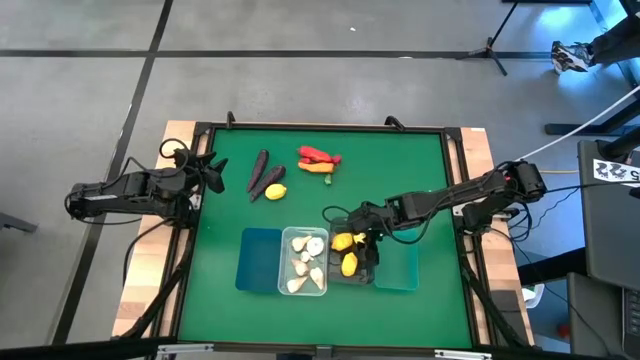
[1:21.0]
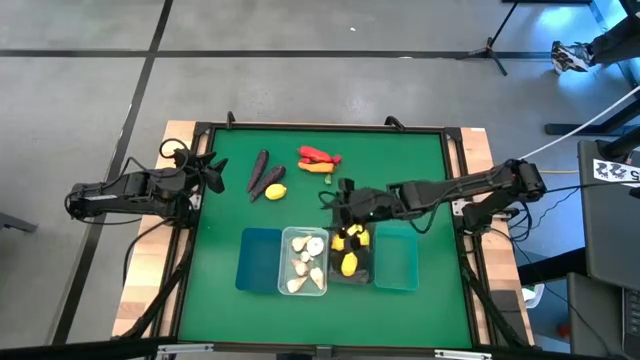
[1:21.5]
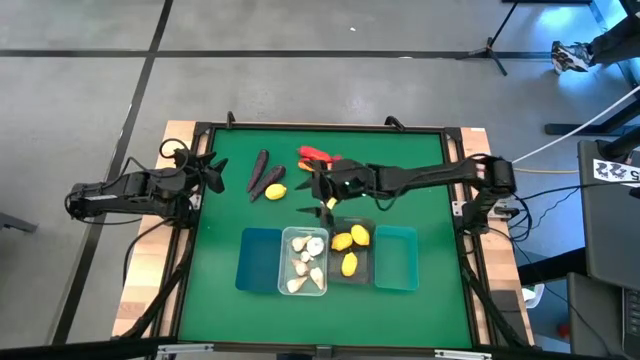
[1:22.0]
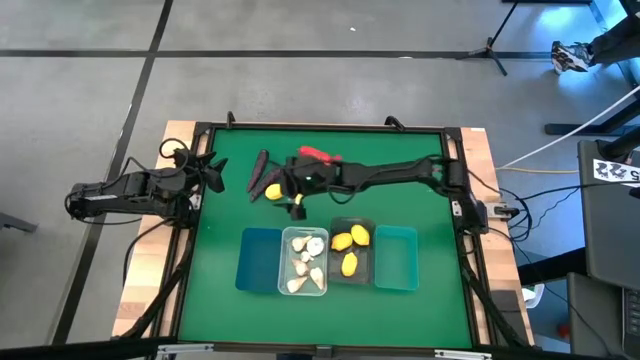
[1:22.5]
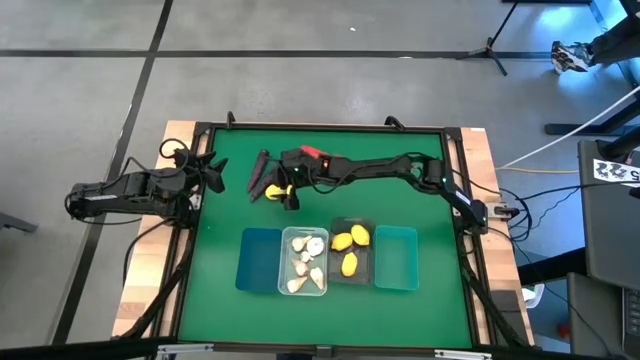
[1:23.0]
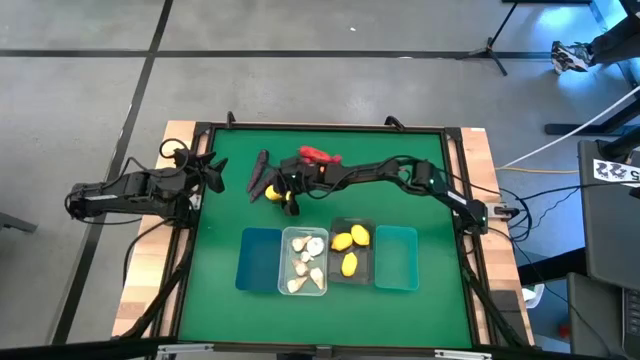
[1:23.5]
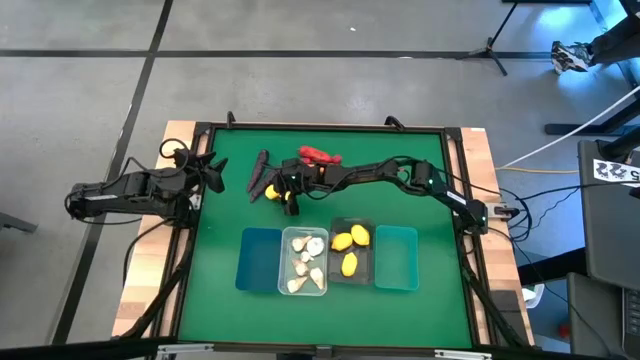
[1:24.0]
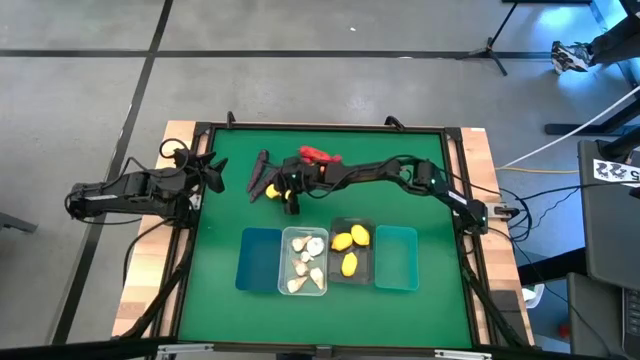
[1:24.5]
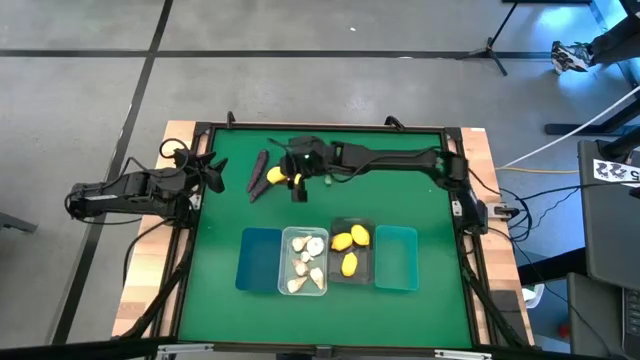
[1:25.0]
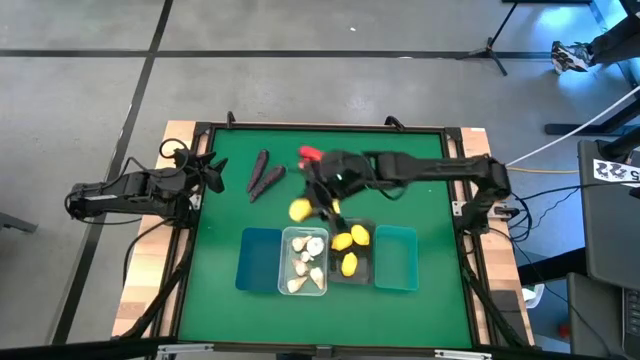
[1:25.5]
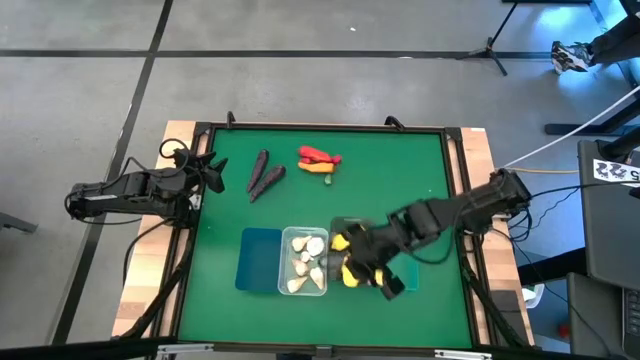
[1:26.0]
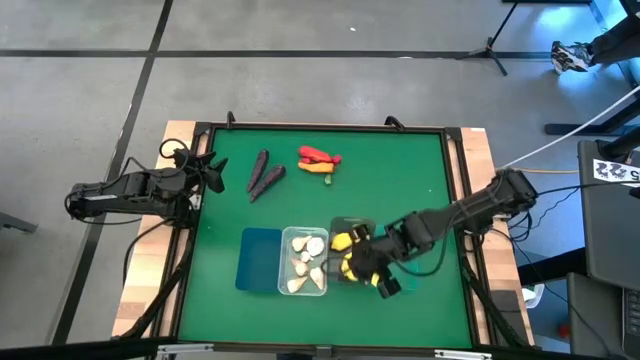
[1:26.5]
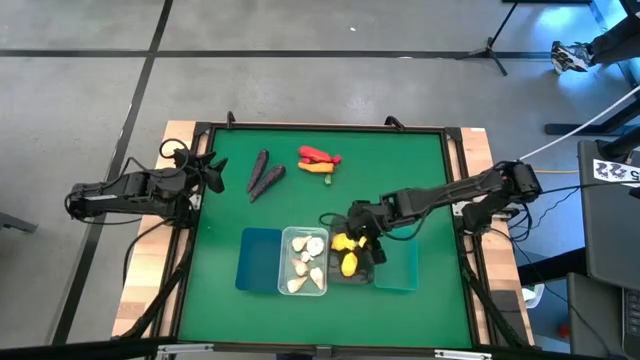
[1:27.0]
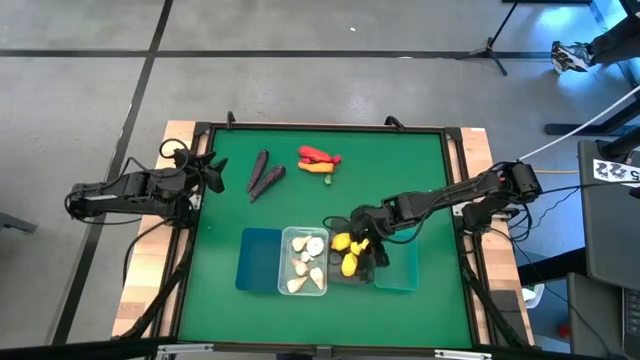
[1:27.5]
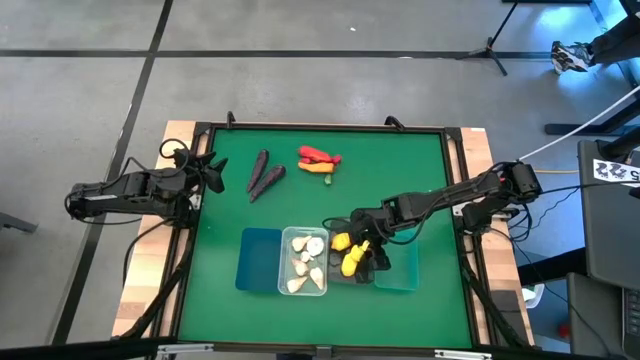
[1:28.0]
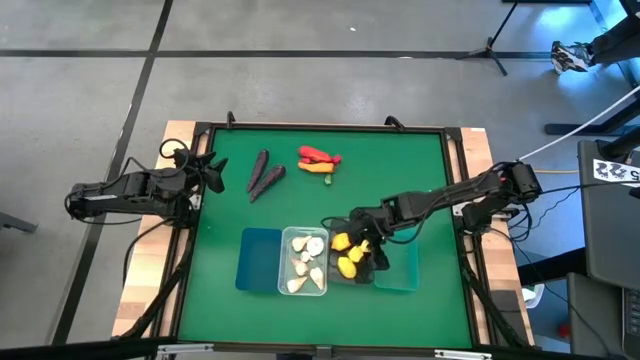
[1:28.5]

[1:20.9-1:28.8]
Task: Sort produce into baskets
Put the yellow lemon into the black bin

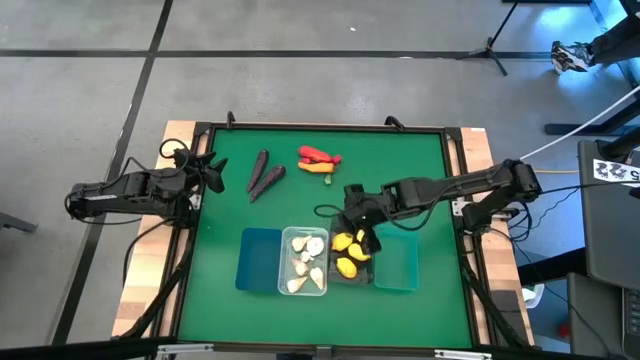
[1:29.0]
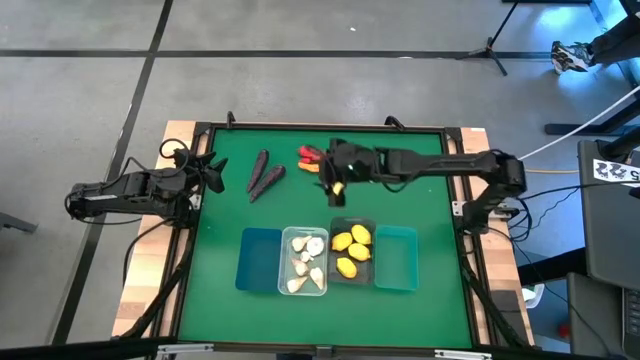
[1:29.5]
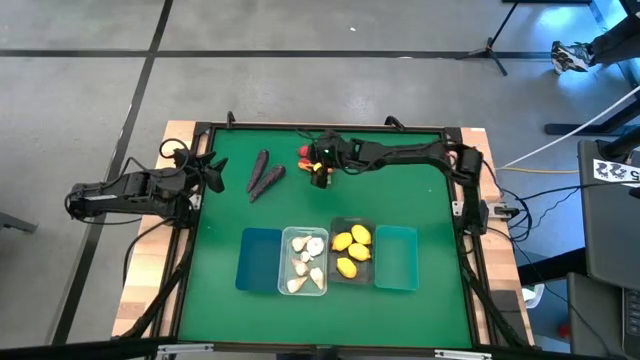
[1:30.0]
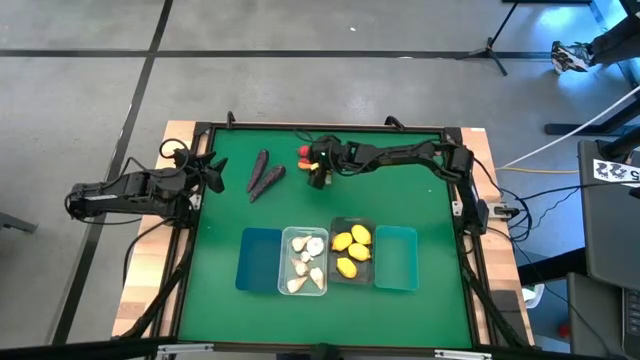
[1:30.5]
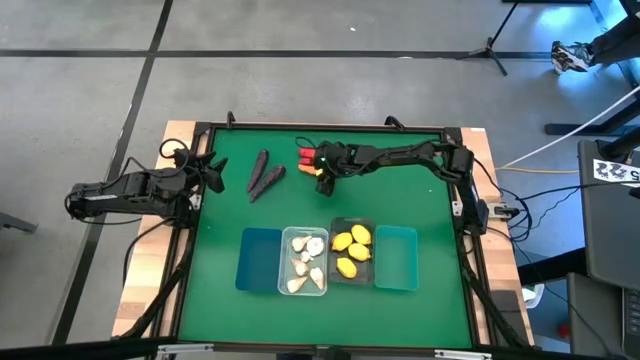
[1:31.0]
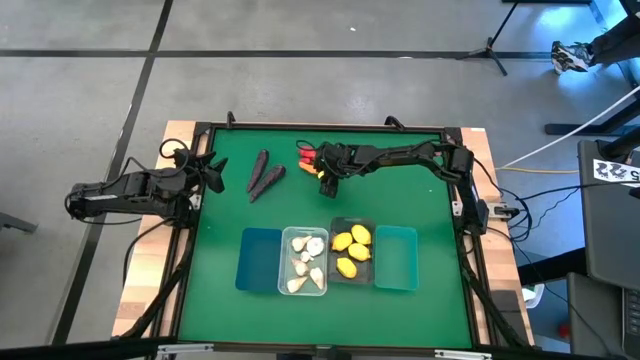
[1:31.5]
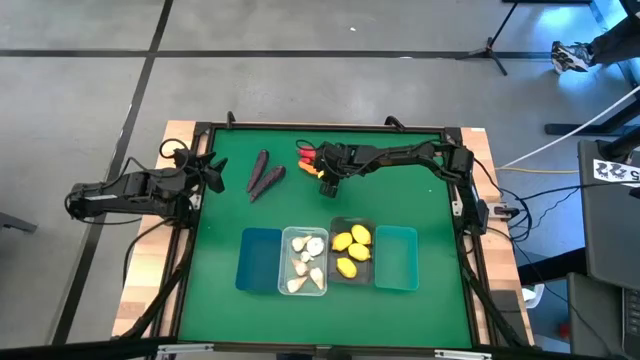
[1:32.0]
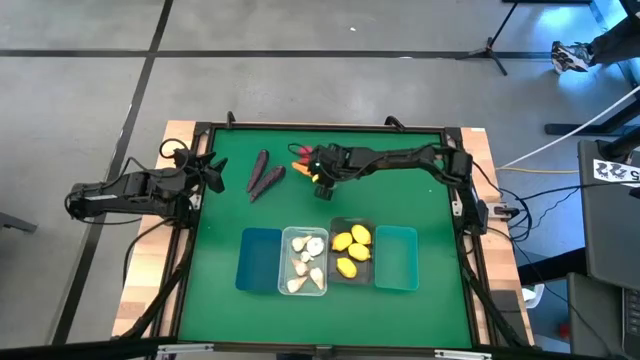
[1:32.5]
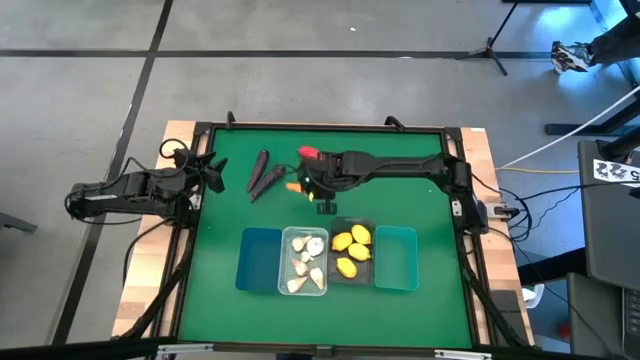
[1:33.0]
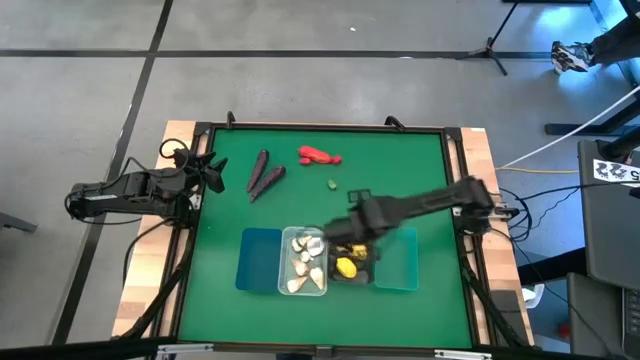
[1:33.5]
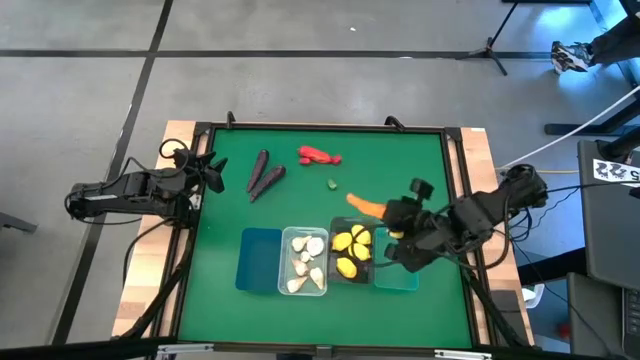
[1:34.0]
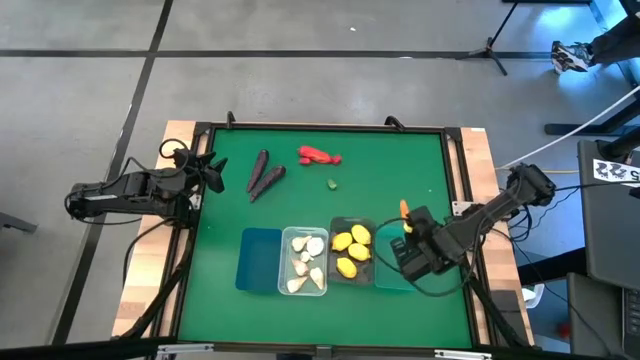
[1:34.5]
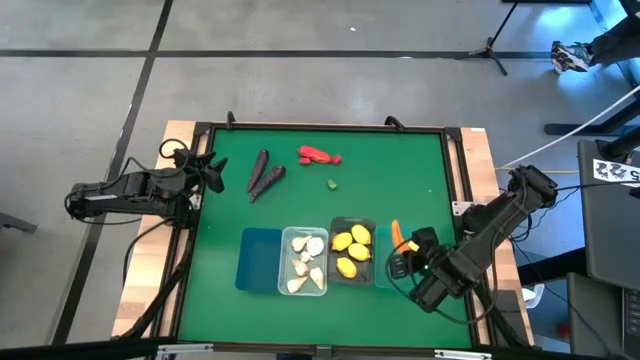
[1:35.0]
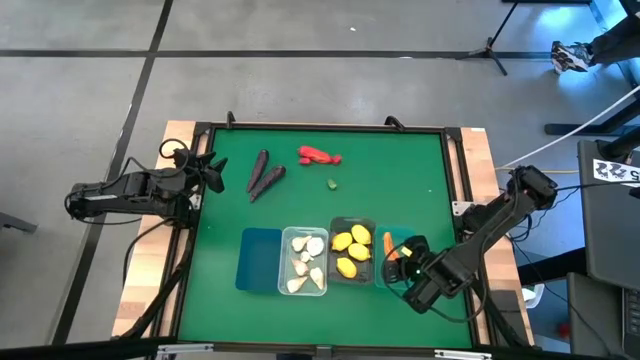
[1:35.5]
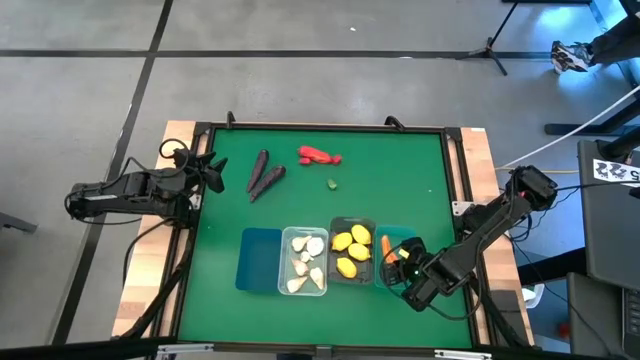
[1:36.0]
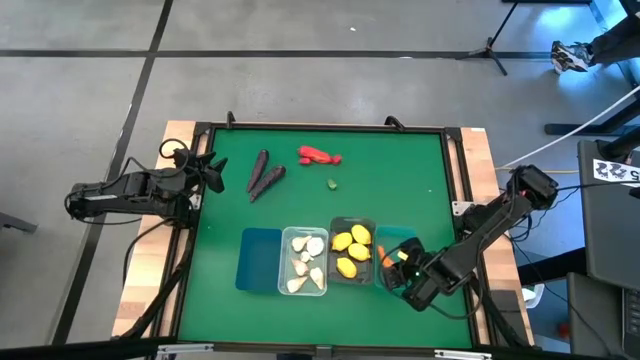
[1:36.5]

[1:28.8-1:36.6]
Put the orange chili pepper into the light blue bin

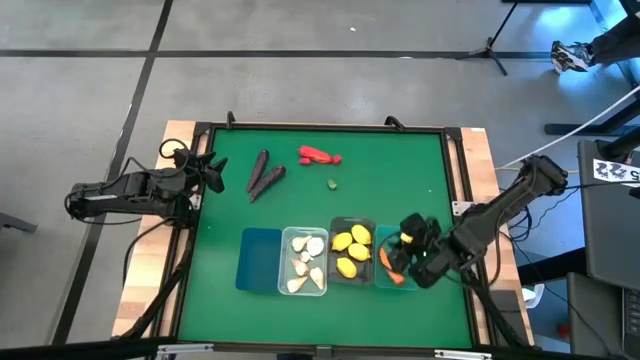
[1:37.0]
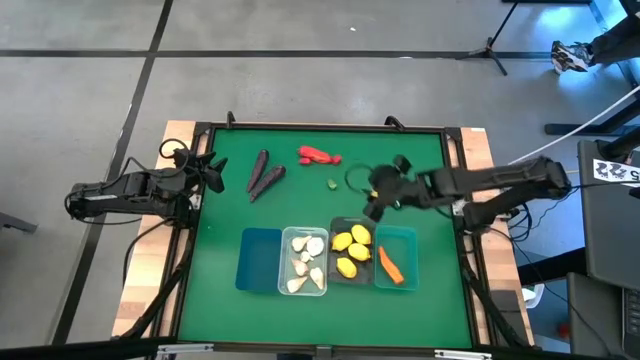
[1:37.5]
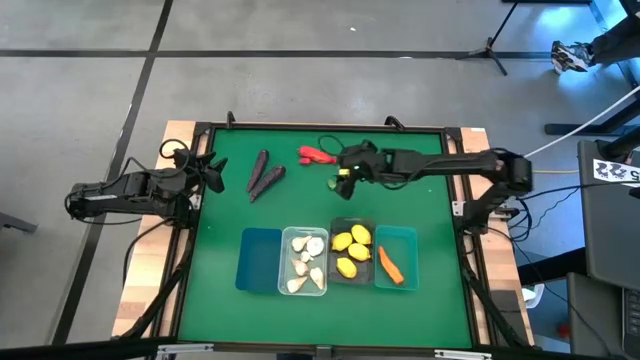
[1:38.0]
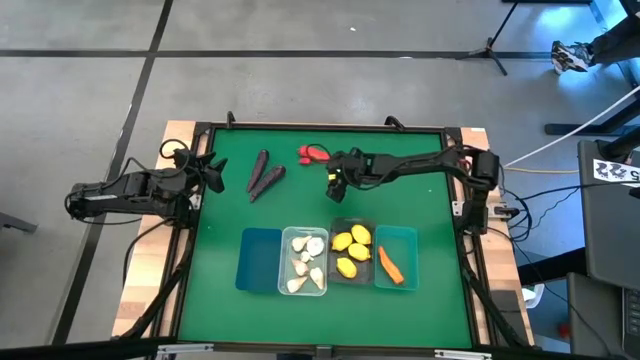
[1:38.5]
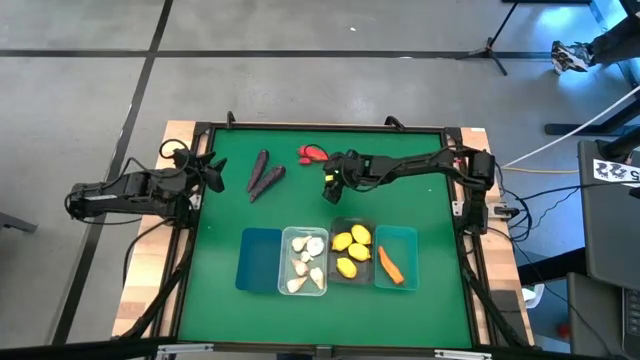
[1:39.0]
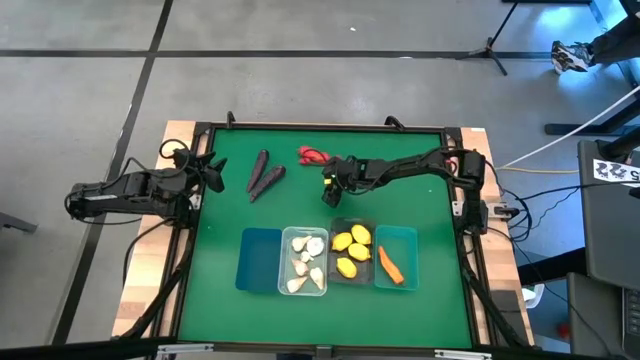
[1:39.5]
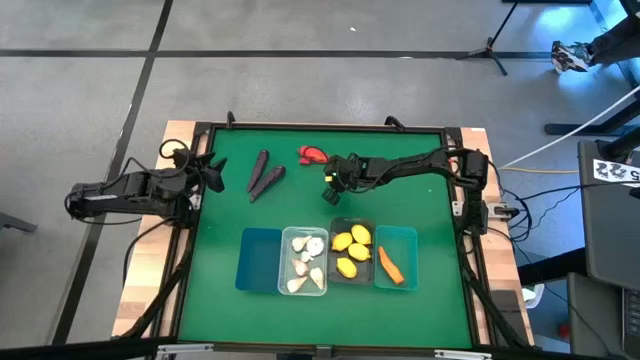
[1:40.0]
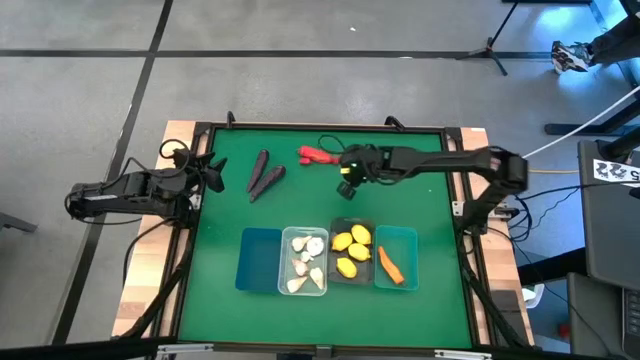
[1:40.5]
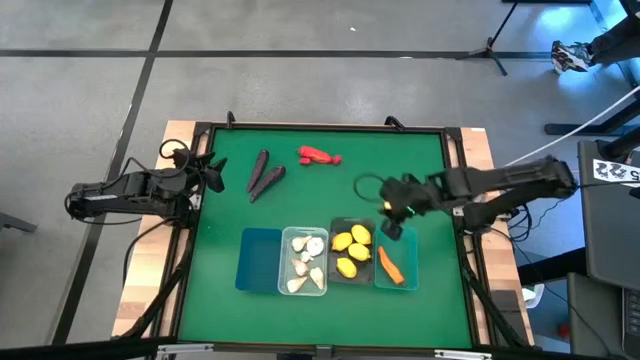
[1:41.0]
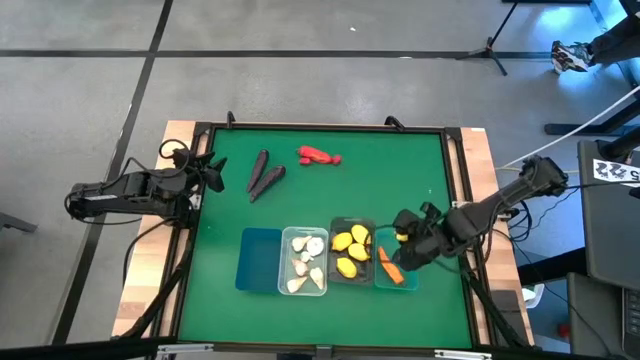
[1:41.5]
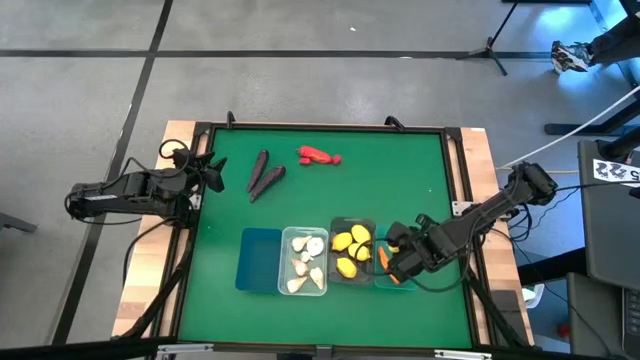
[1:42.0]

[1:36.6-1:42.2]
Put the green chili pepper into the light blue bin
